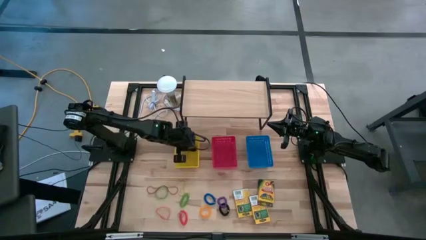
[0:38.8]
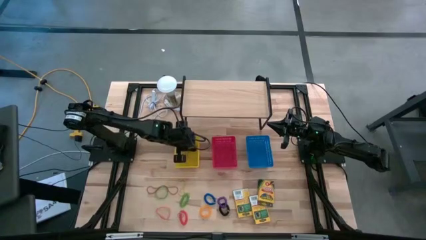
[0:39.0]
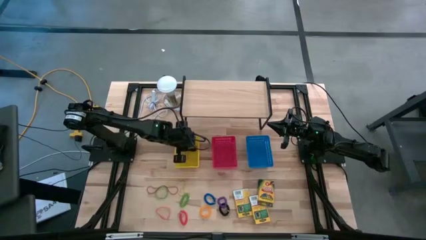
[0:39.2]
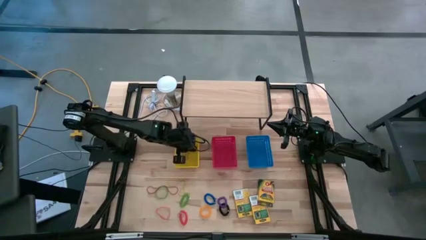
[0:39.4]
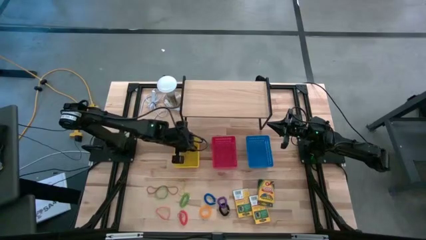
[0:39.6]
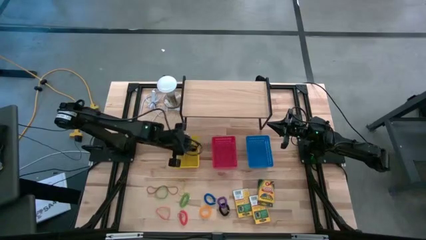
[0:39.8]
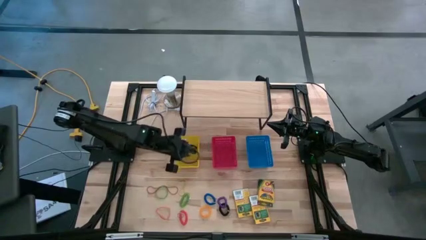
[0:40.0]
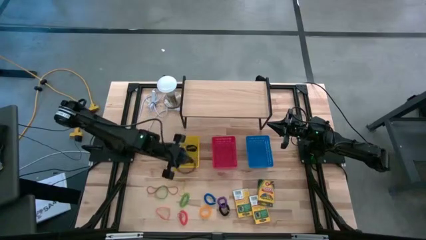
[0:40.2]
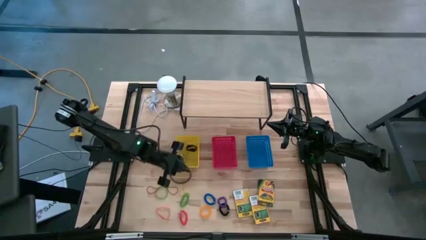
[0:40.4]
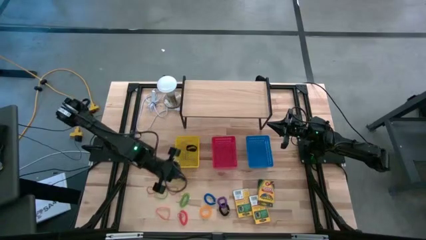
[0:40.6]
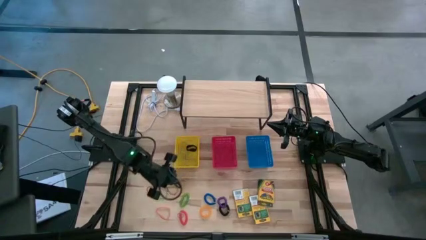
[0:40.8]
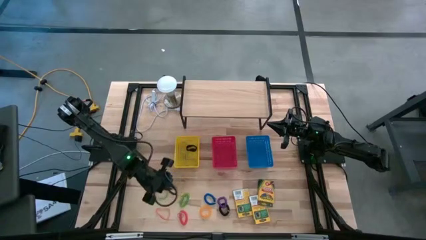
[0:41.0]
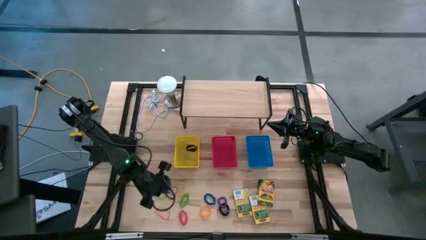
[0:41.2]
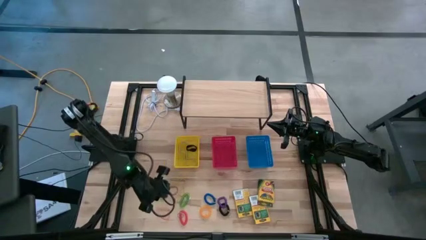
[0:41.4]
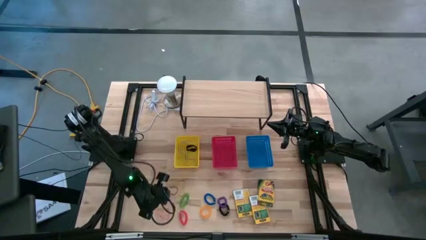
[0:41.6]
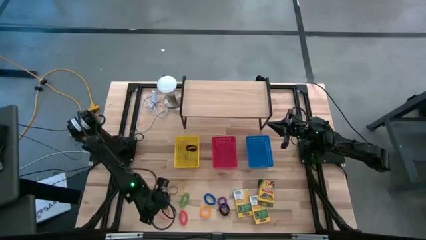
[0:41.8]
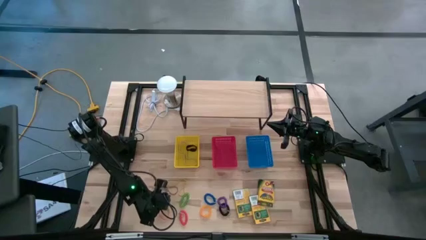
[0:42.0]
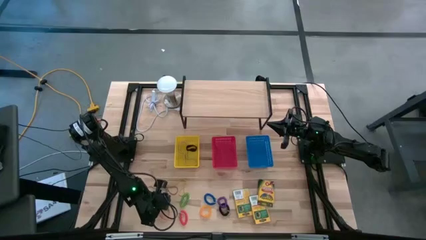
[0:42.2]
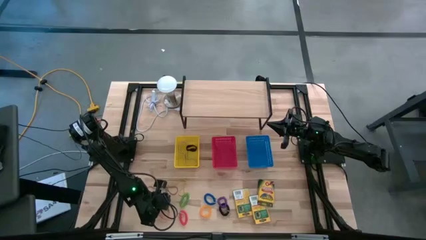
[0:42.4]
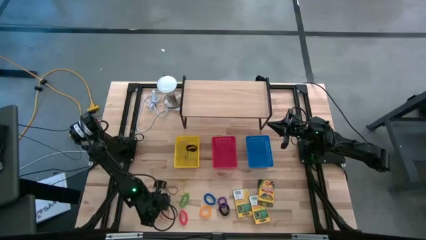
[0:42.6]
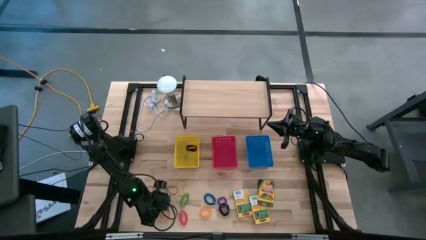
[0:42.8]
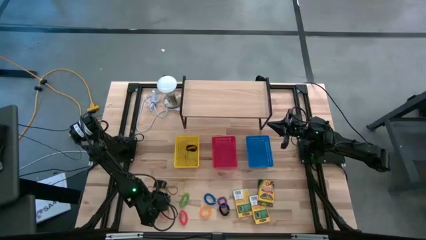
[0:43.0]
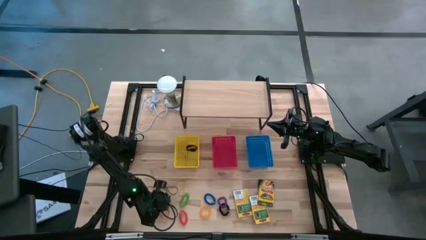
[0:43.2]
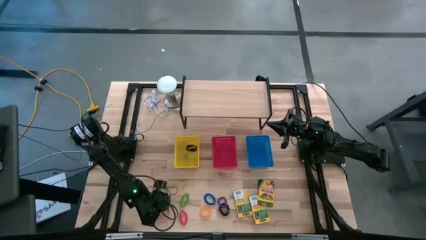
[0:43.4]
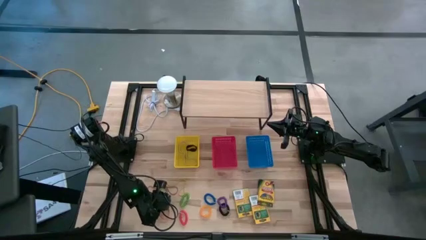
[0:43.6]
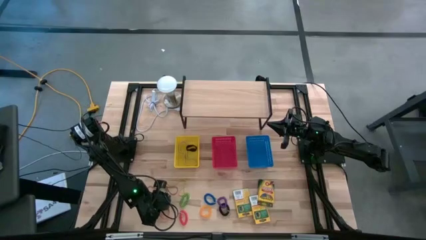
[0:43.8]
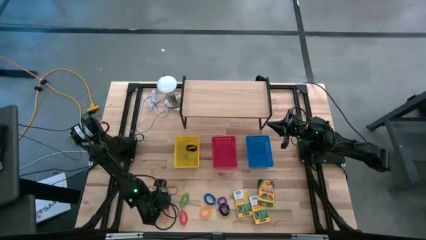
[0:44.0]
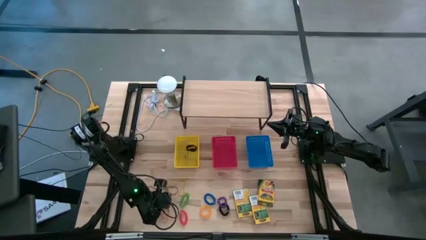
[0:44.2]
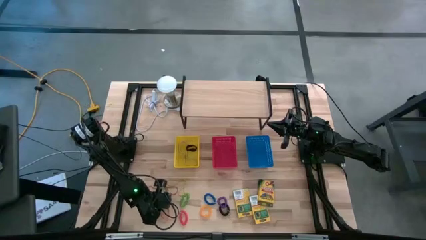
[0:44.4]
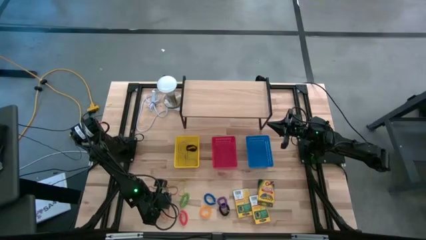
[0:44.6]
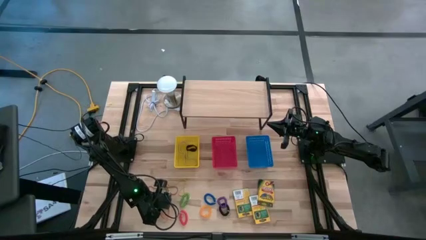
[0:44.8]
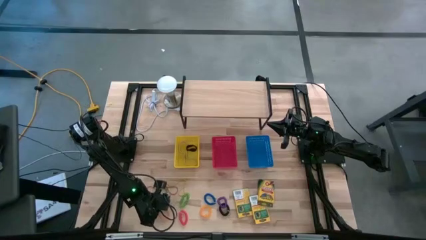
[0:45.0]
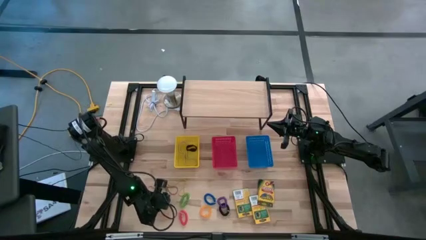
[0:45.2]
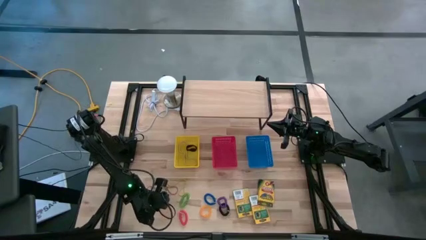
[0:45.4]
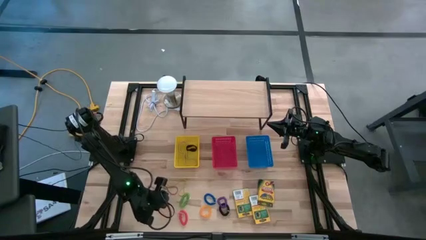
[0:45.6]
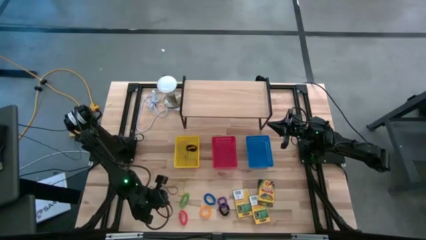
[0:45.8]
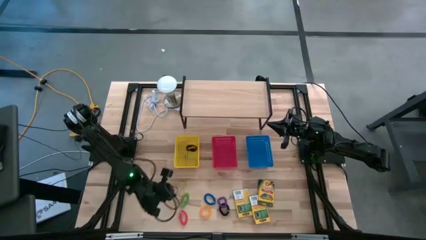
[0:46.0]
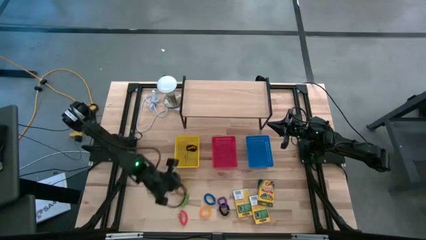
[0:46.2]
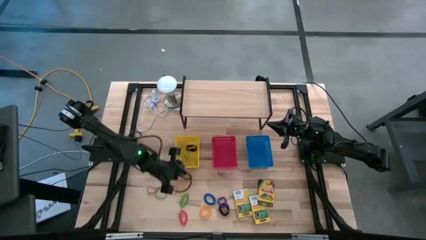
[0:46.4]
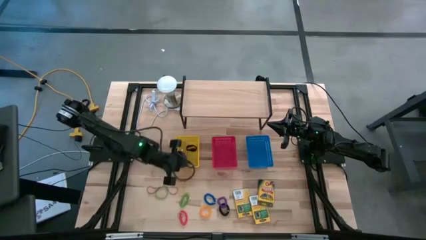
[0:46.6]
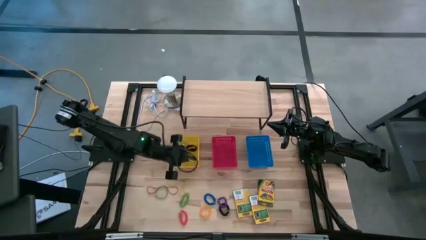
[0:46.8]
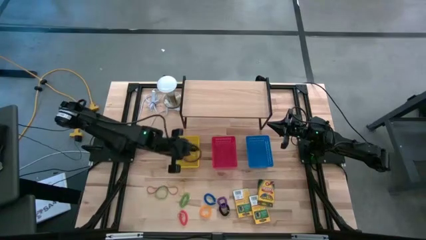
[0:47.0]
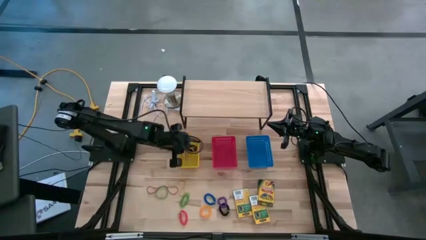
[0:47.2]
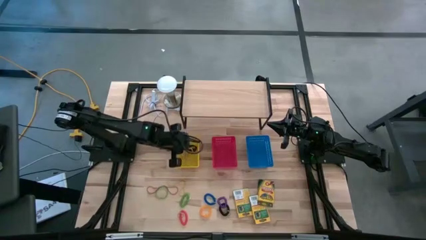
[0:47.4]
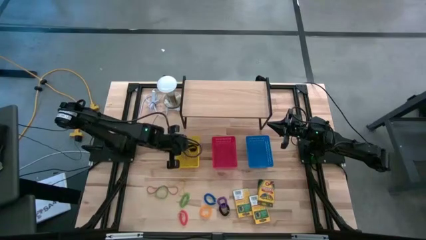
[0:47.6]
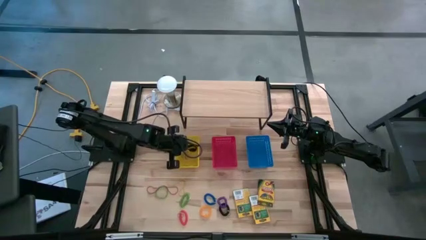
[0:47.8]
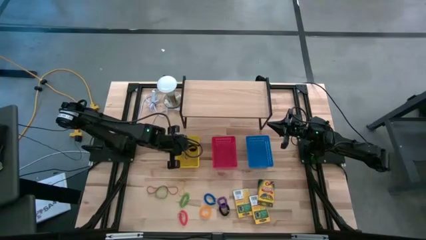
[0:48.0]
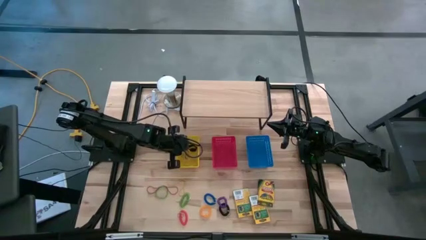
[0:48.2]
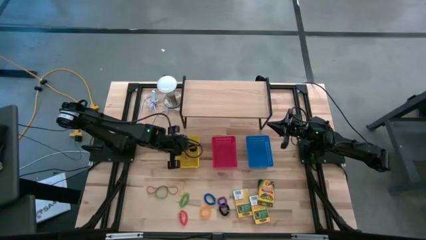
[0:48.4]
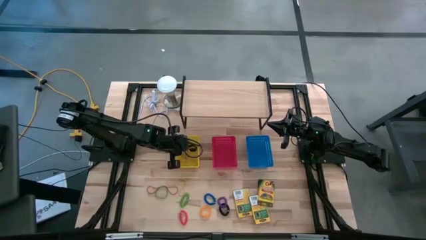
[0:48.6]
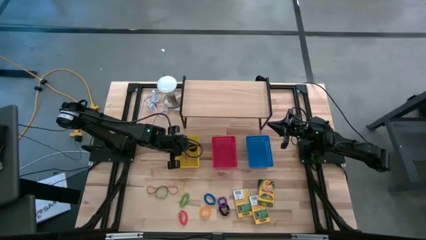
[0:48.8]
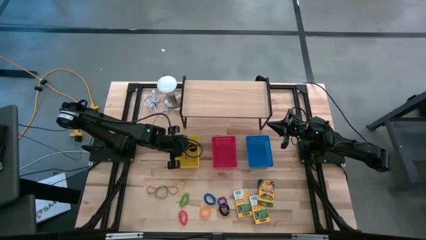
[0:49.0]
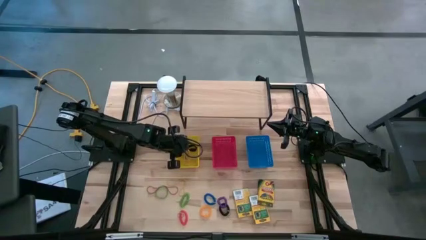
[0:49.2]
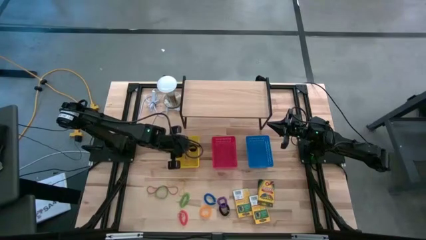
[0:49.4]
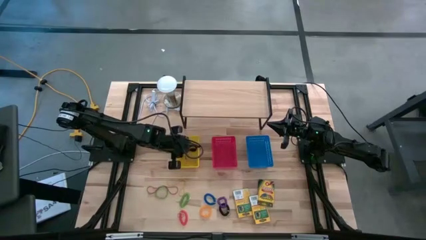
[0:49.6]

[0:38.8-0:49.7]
Task: Pick & Place Office Desk Supplies
Put the orange rubber band into the yellow bin
